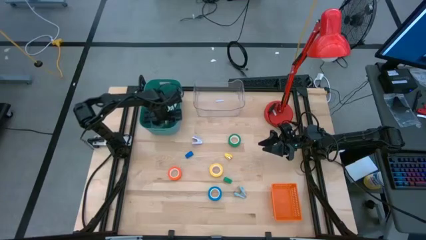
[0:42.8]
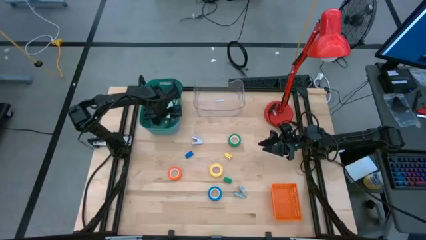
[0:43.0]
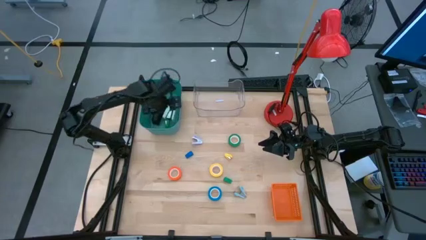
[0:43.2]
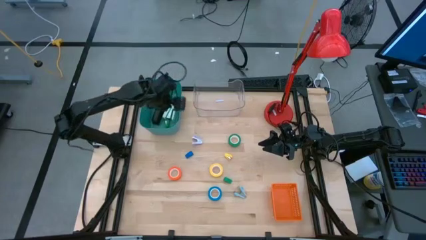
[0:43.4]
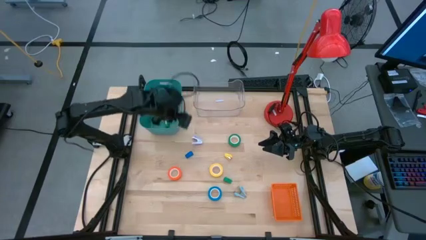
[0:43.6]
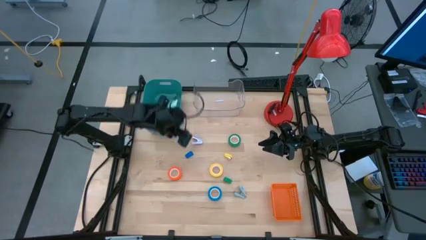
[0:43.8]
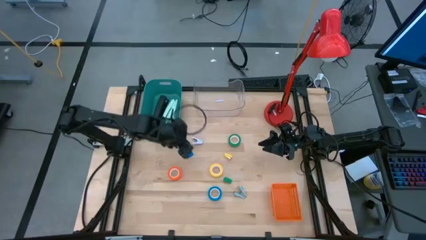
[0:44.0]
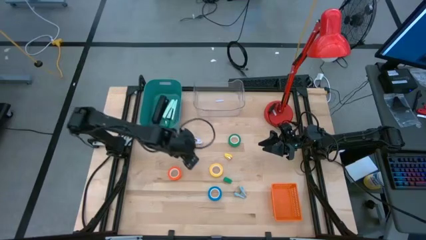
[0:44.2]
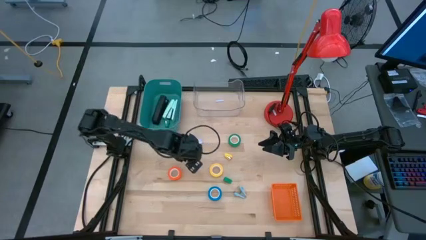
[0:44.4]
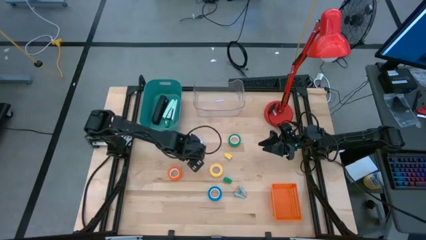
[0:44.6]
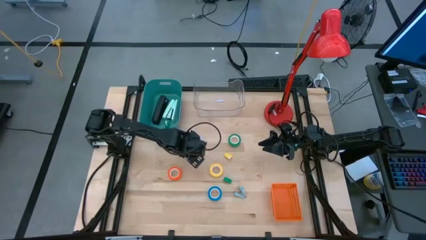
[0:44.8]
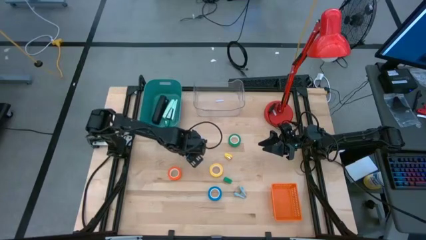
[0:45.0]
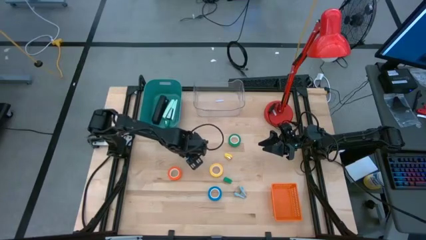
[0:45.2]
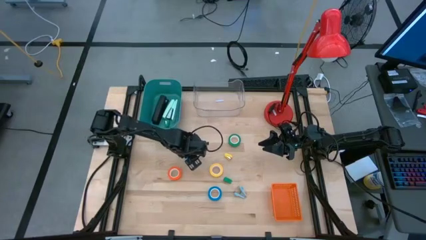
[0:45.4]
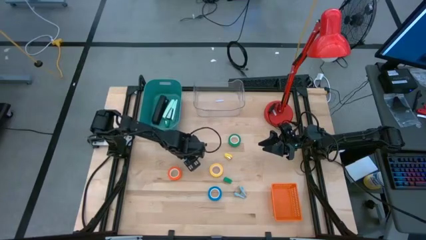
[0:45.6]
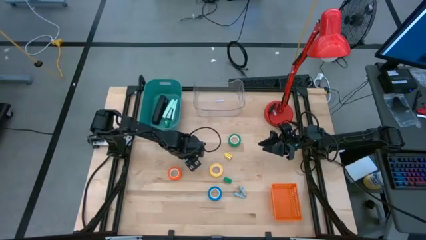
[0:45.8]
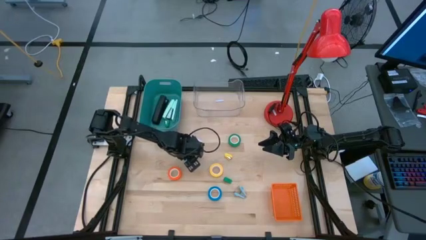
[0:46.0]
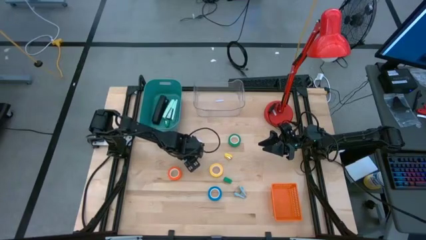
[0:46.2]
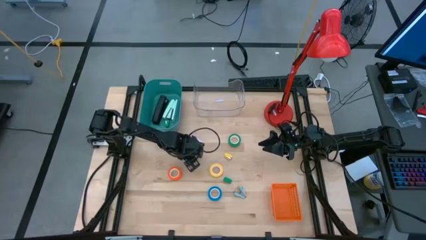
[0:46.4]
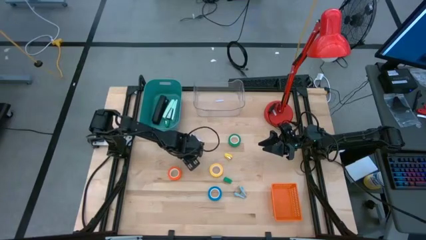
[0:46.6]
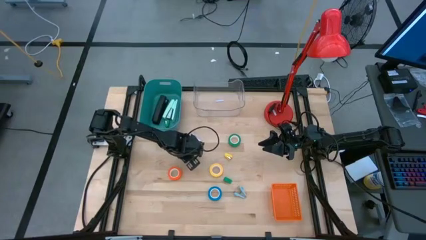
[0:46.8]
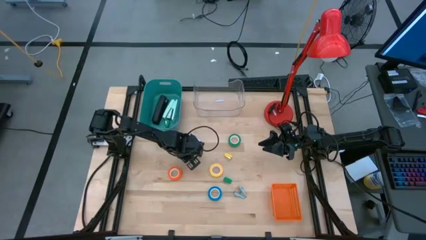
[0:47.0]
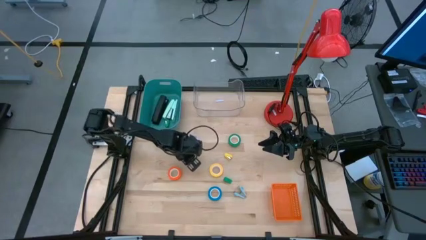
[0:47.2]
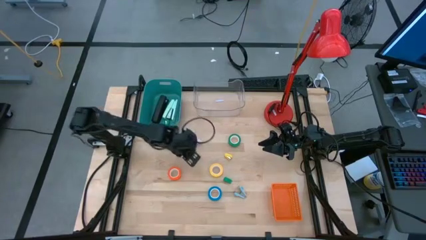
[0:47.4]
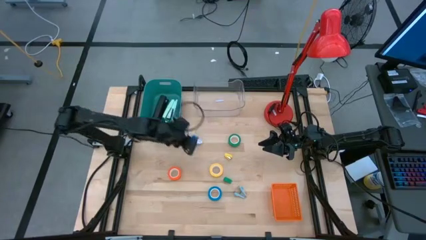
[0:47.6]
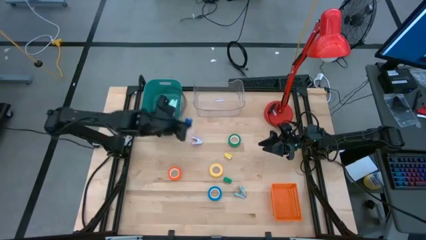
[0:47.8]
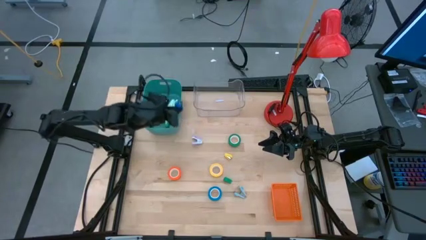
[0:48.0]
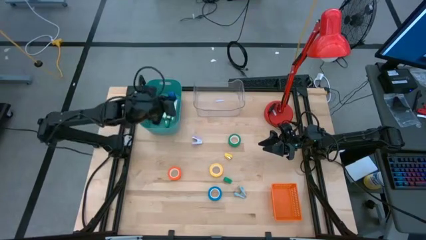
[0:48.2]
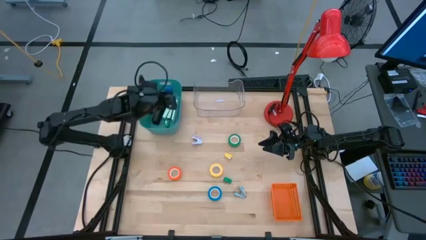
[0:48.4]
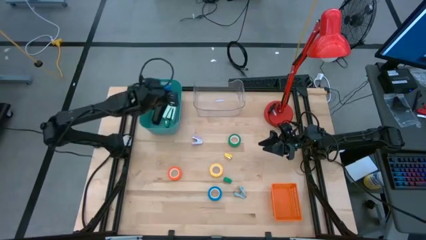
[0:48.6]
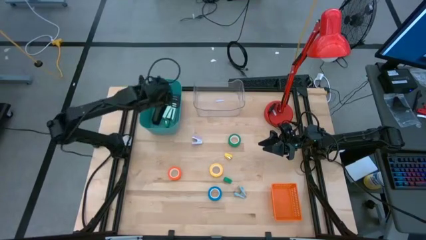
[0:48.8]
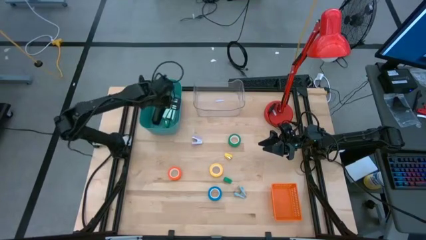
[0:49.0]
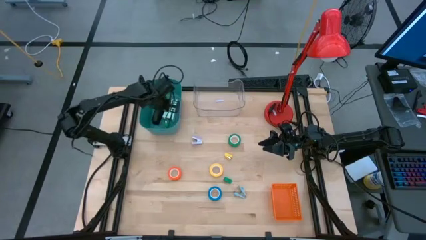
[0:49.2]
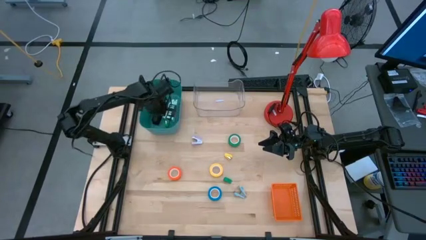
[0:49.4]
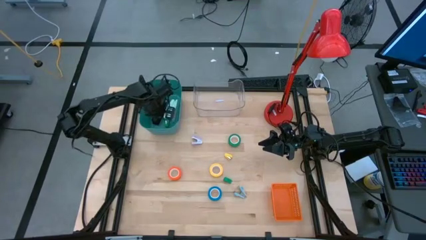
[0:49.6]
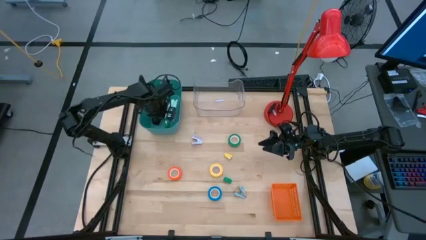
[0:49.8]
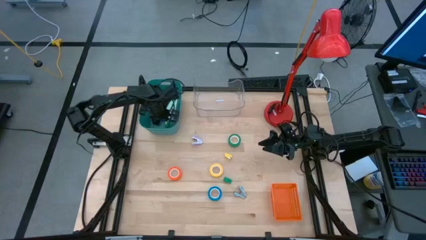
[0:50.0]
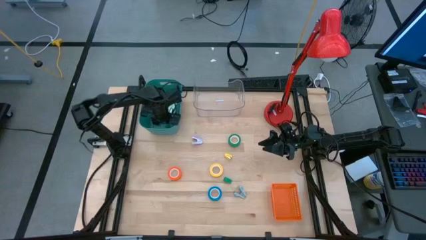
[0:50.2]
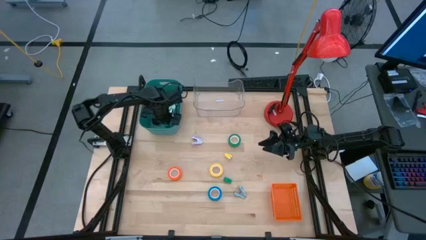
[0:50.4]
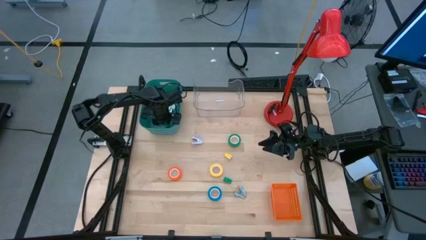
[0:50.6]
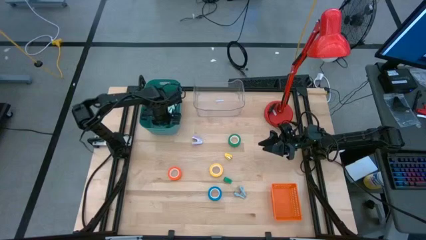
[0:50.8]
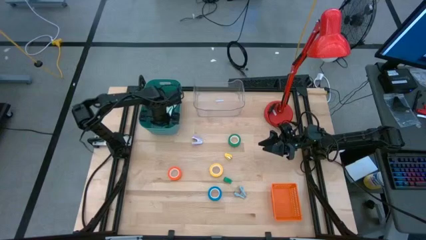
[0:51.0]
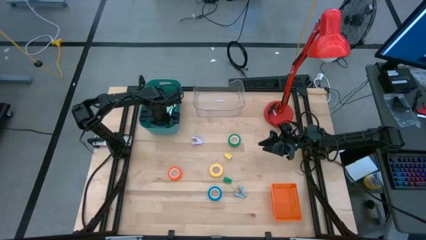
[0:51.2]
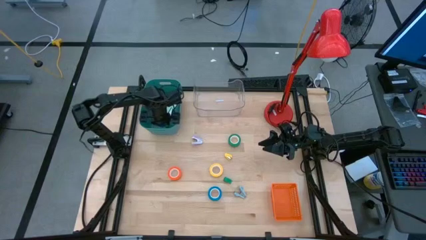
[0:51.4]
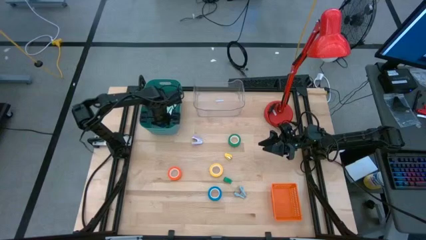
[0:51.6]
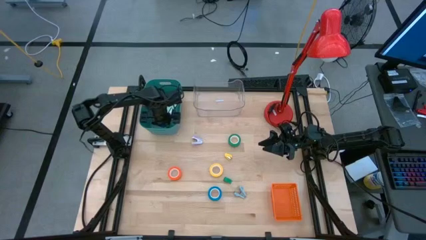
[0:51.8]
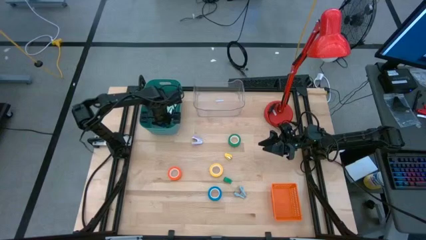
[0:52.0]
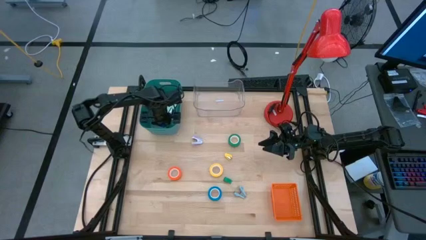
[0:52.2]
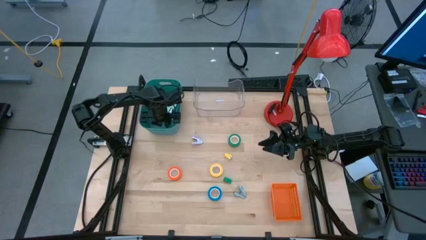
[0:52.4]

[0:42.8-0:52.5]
Task: Pick and place Stapler, Stapler remover, tape
Put the small blue stapler into the green bin

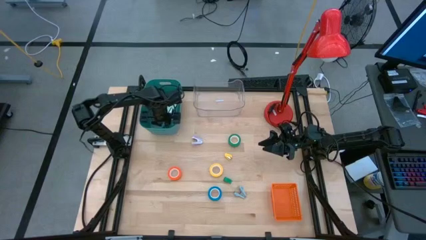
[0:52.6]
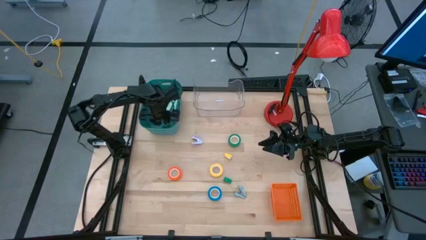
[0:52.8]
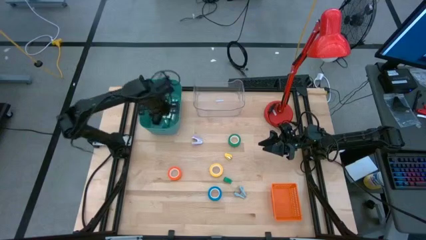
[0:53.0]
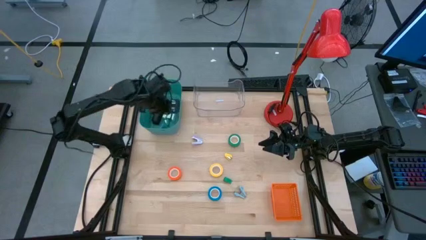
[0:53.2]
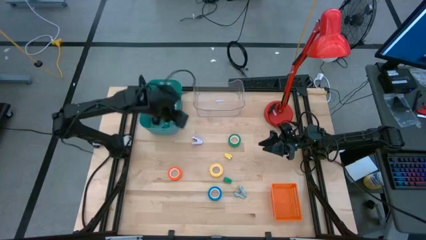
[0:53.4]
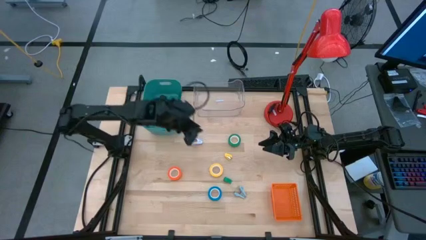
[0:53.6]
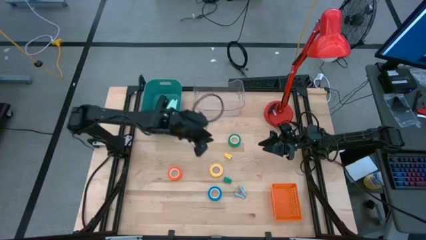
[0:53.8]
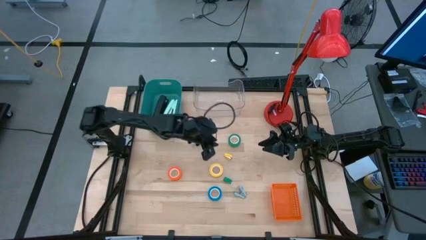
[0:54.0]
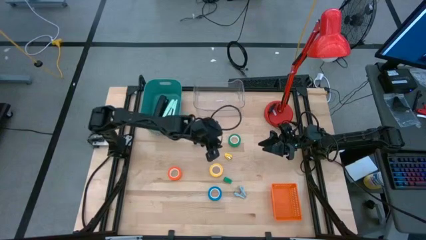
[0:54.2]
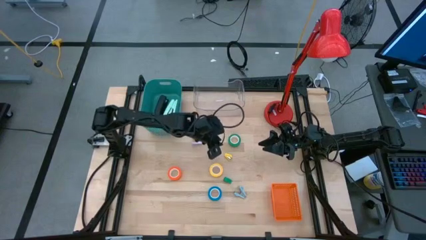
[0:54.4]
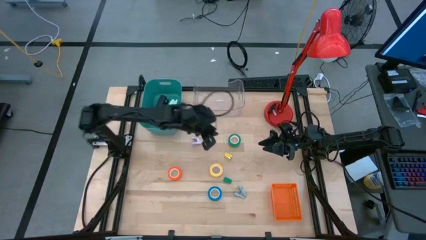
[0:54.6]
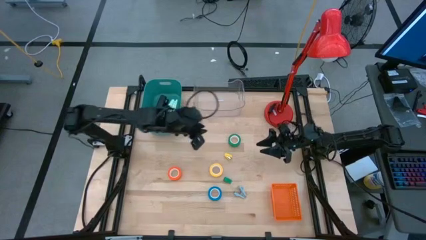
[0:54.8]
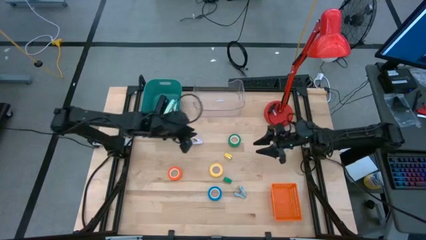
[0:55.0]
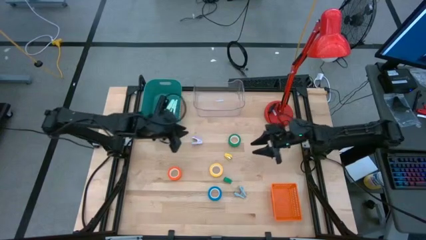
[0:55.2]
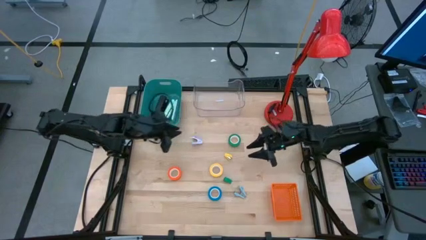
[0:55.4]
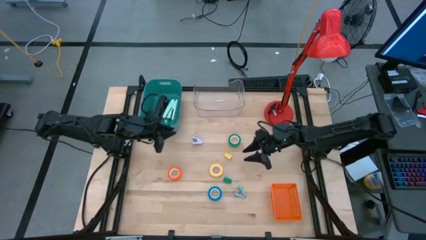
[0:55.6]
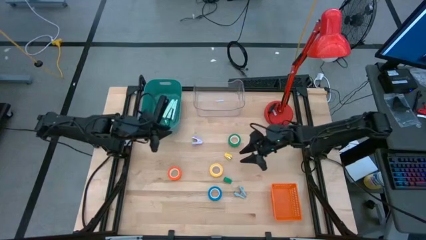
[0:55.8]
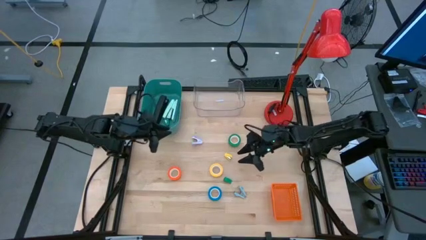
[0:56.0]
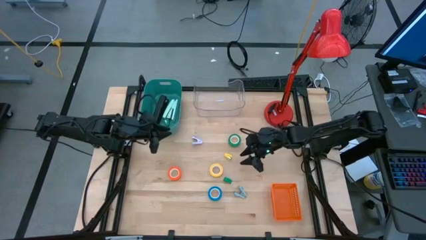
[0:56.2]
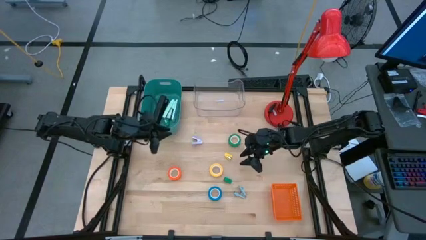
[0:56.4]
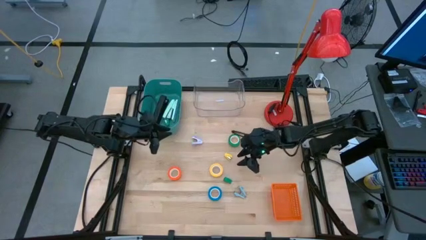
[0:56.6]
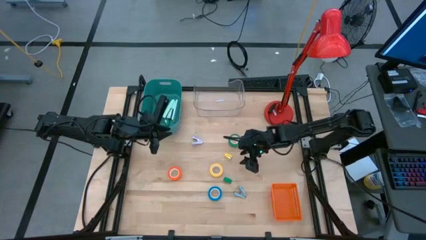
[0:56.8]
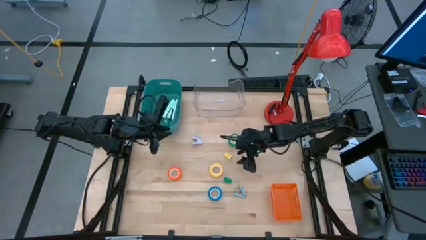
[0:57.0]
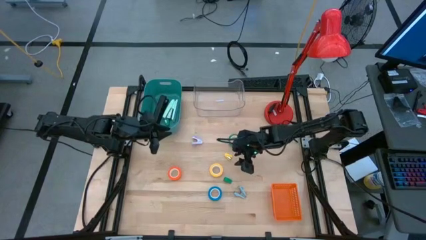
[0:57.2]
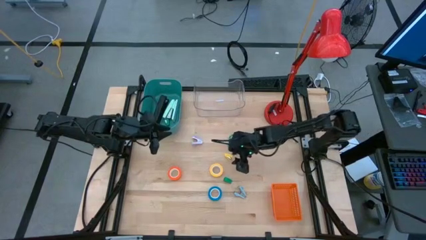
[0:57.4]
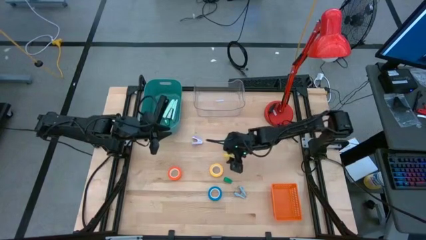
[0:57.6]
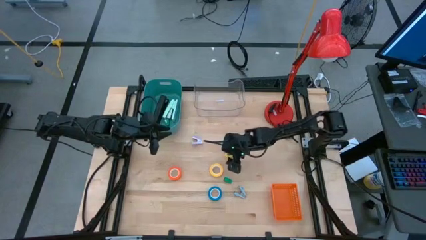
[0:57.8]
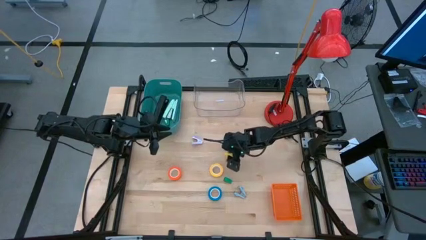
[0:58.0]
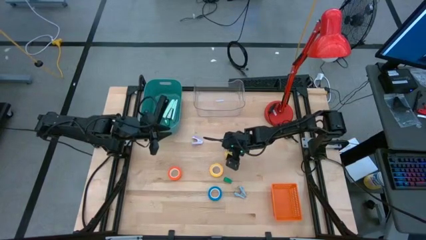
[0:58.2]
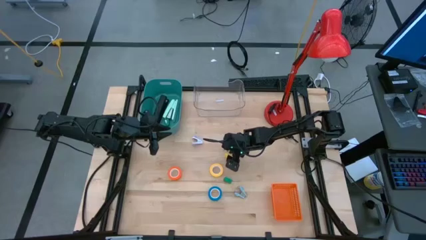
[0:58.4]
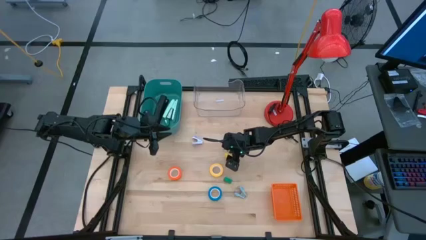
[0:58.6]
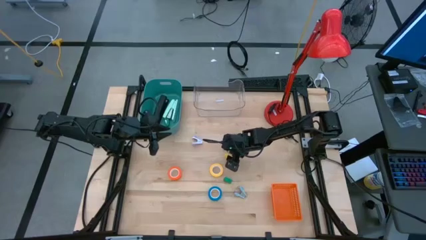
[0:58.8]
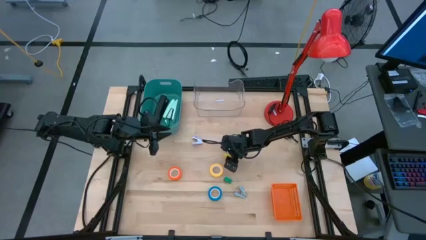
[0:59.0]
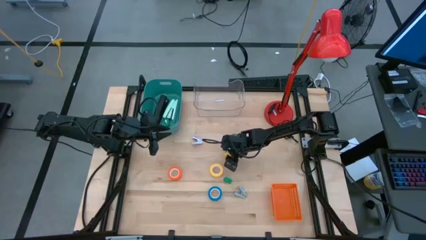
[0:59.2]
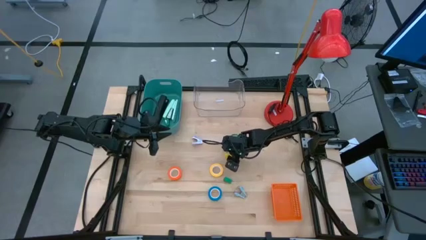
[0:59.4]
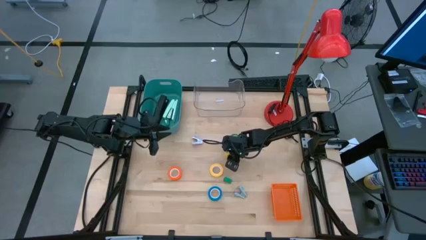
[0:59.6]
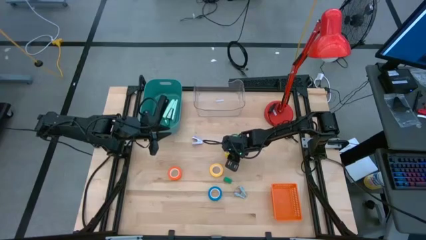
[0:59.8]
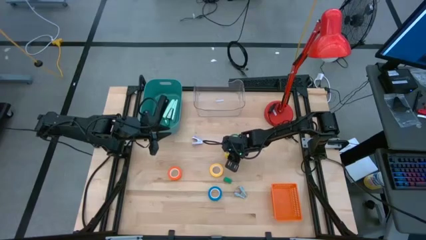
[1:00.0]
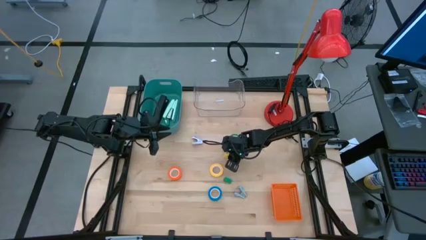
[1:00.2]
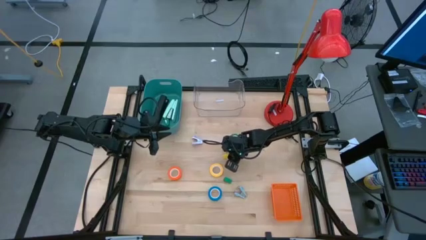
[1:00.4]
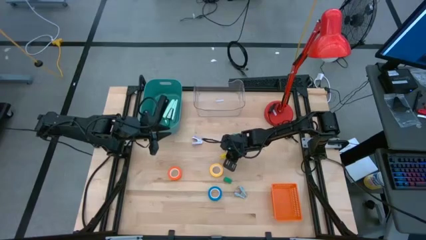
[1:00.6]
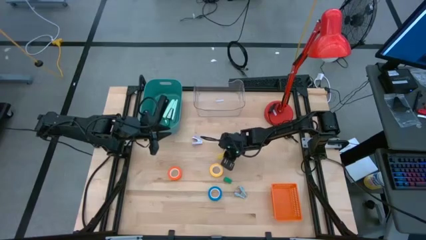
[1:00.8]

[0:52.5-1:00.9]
Put the small yellow stapler into the green bin
